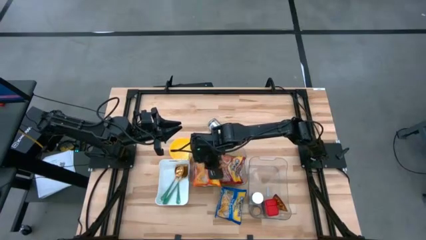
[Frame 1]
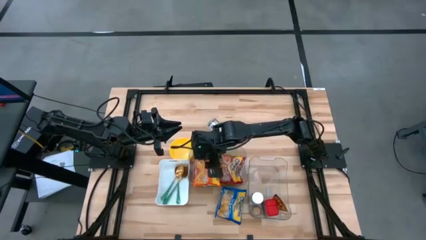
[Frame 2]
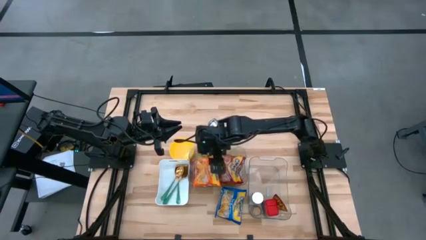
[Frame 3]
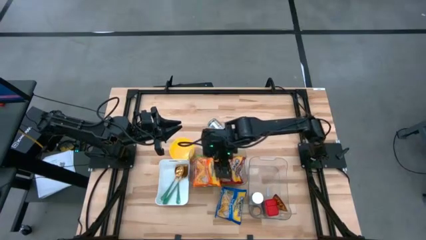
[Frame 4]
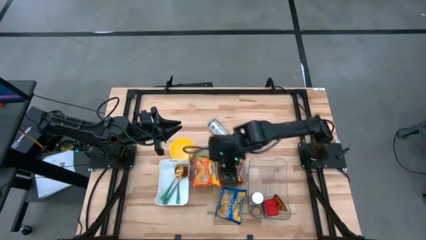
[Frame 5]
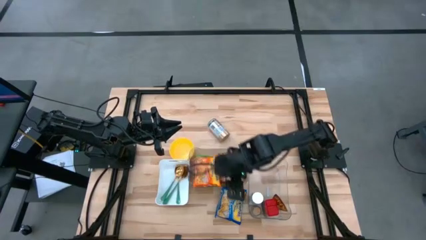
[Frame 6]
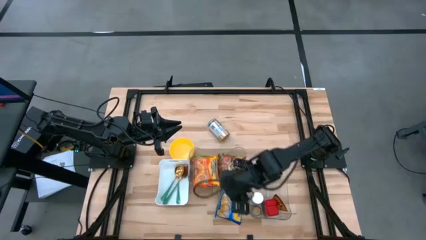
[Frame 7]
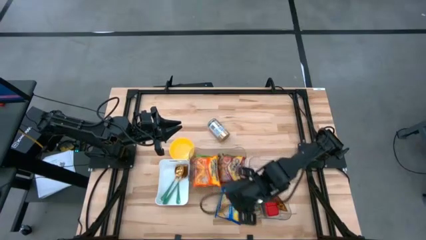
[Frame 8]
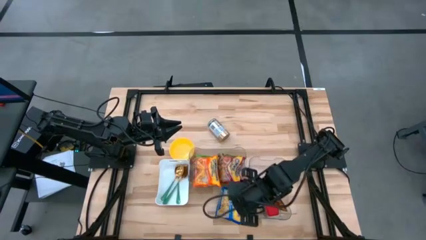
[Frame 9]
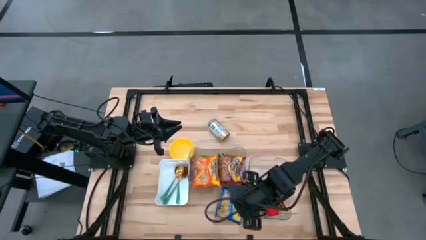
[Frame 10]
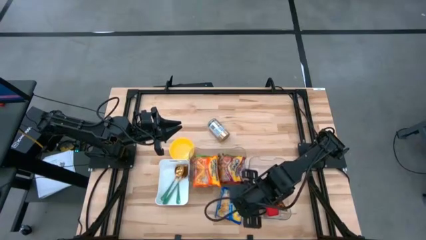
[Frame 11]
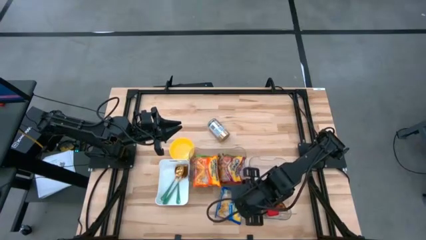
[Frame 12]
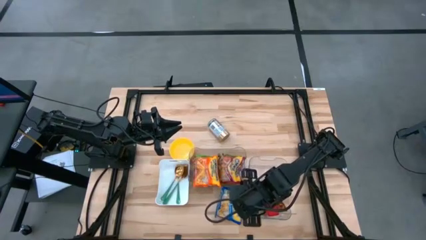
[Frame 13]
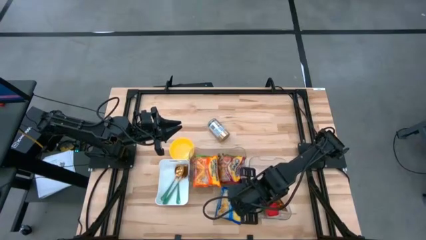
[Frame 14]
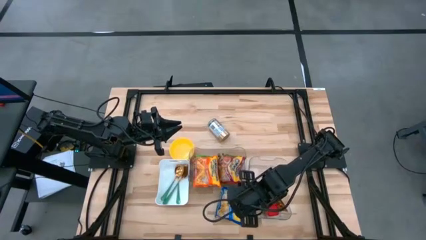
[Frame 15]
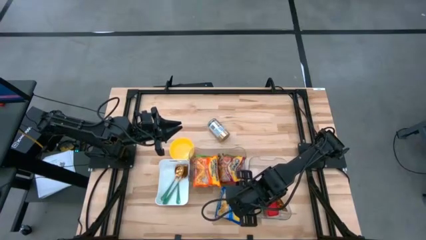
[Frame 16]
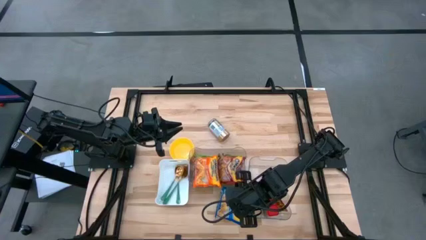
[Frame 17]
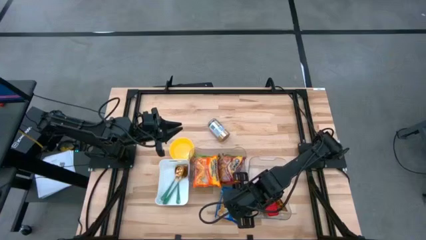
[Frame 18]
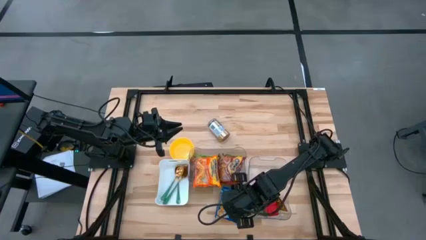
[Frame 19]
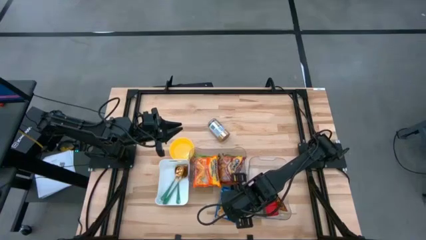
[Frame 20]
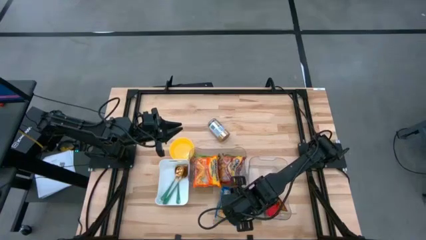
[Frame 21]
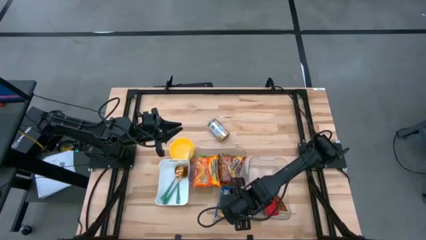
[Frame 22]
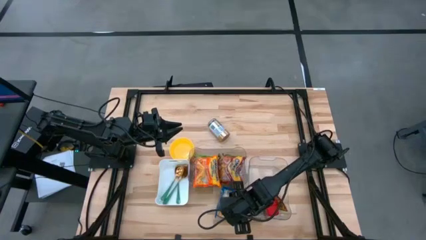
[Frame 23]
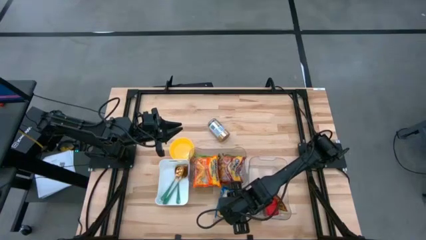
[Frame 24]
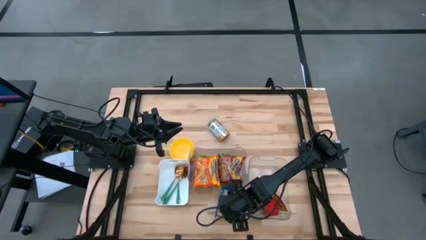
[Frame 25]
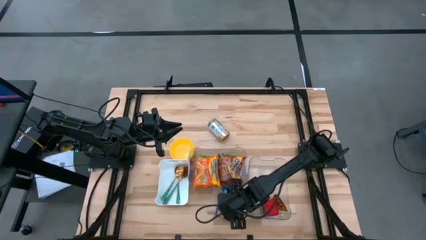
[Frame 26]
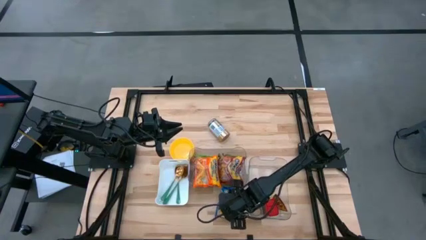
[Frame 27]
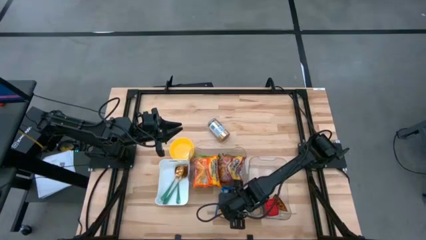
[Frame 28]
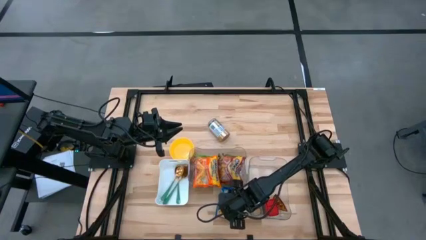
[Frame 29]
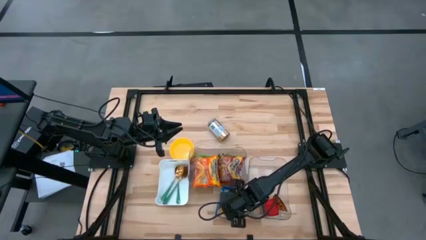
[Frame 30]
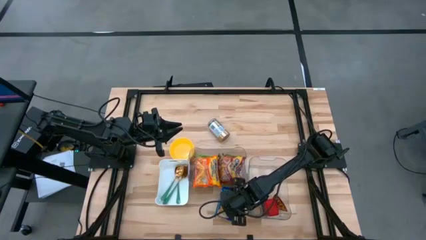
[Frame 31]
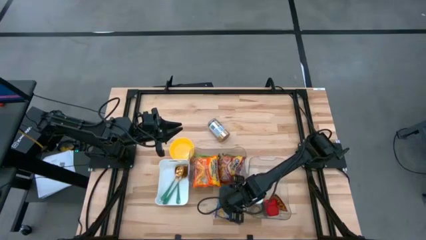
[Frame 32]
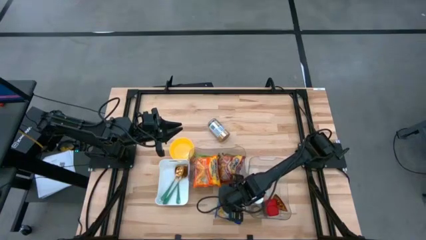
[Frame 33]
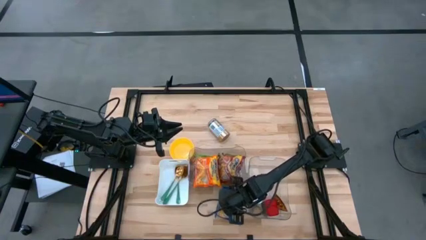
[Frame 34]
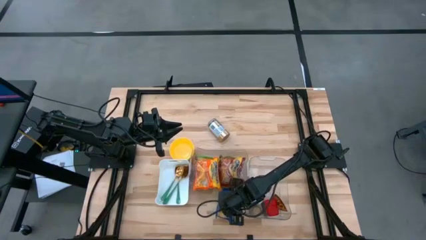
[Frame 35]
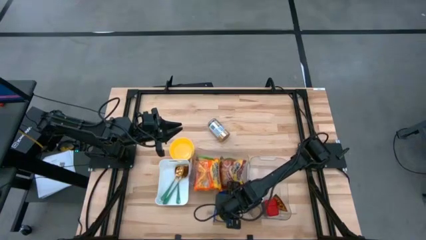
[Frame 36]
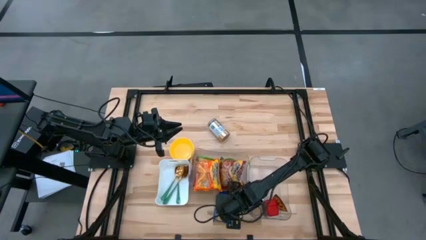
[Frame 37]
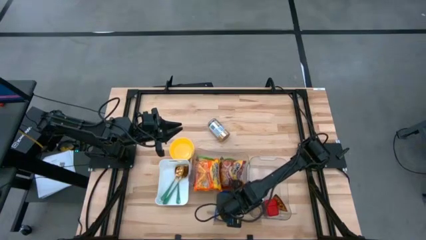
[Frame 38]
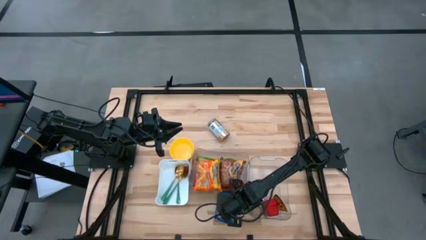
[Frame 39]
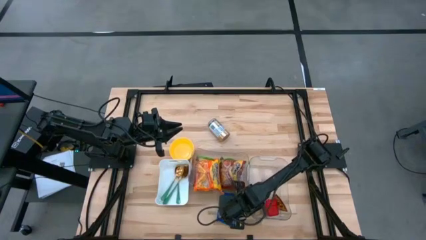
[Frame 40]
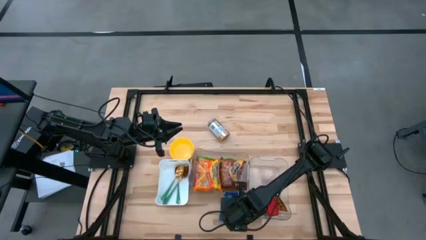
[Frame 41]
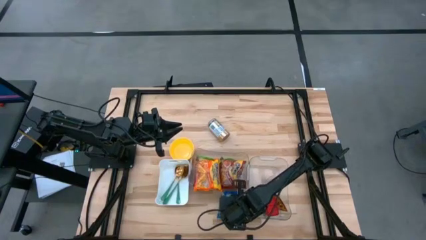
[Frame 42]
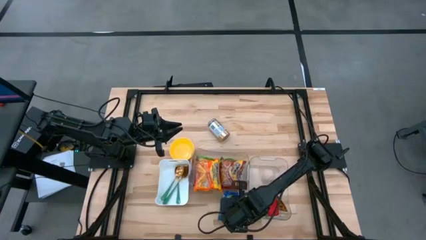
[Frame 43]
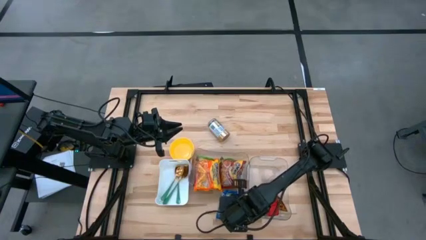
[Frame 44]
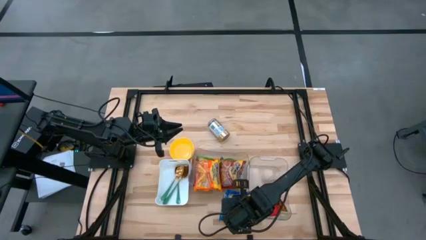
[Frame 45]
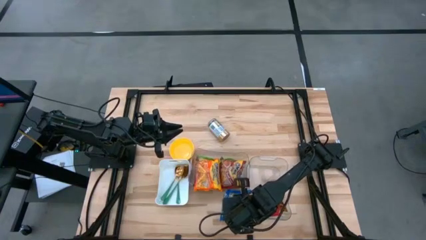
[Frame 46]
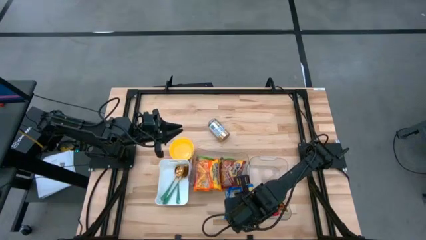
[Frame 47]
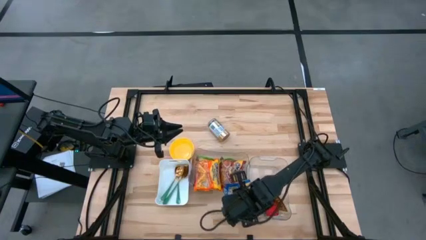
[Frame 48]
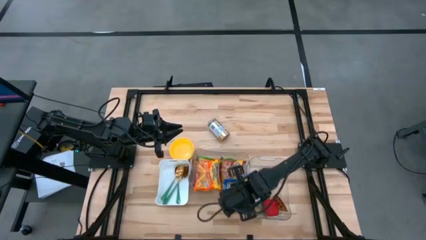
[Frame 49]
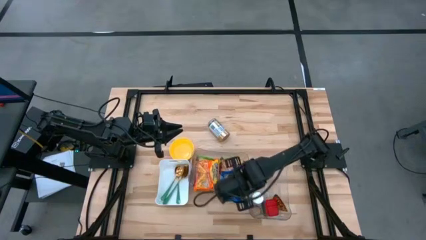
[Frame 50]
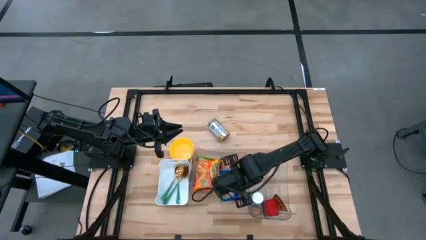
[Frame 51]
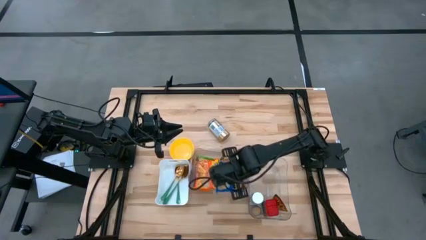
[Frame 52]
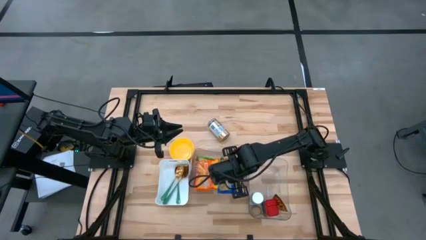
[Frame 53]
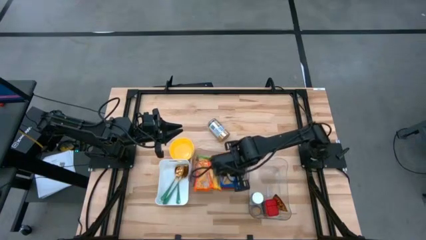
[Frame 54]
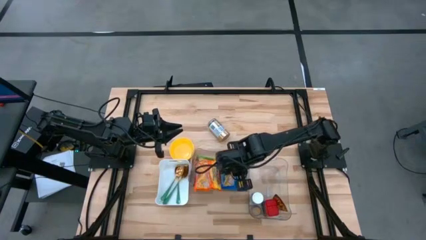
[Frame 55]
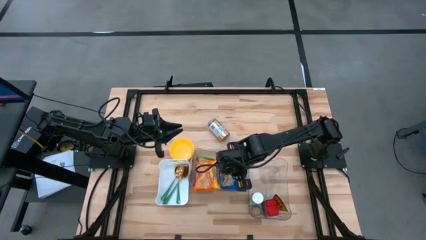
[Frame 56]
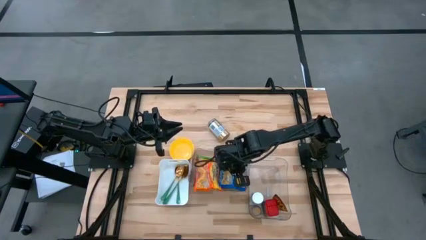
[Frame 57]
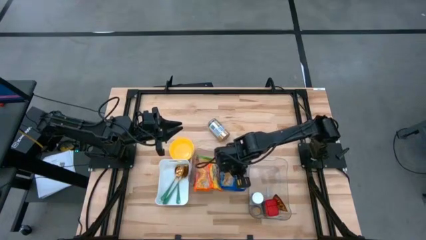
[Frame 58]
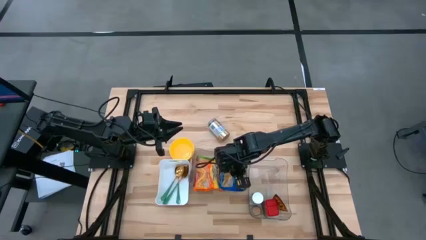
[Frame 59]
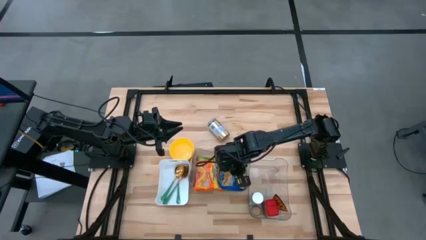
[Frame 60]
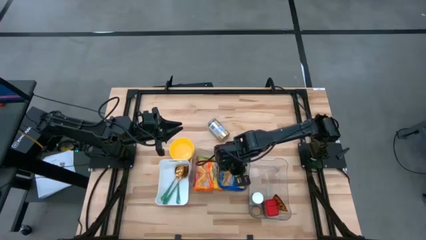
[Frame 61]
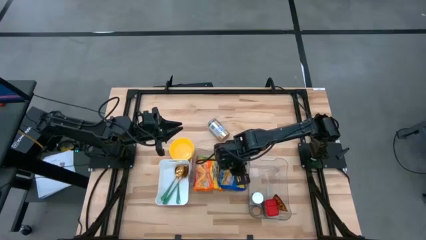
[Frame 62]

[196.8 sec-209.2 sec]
Task: Pick & Place Food Item
Put the blue noodle pack into the left transparent bin

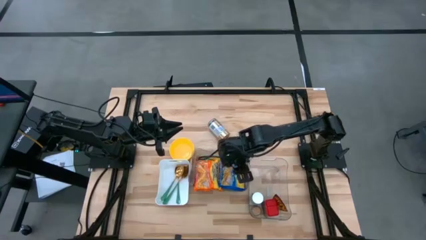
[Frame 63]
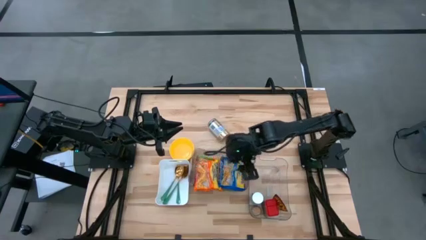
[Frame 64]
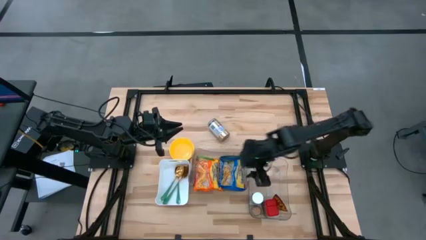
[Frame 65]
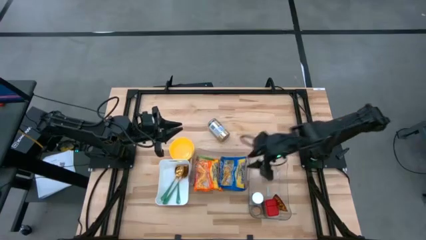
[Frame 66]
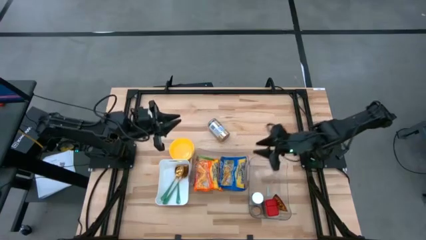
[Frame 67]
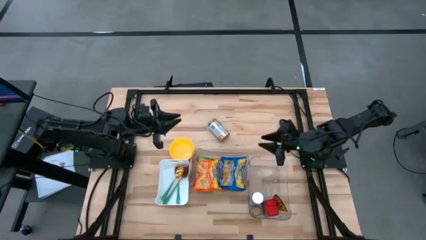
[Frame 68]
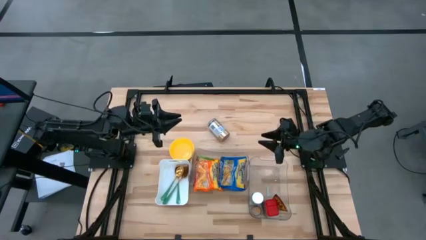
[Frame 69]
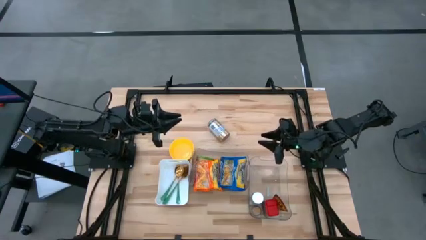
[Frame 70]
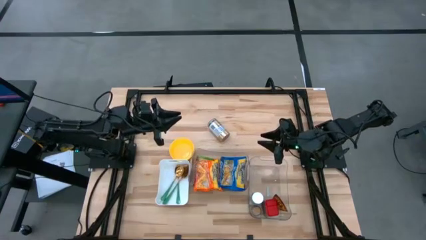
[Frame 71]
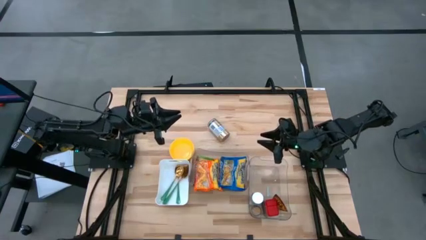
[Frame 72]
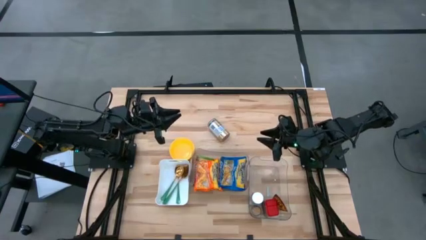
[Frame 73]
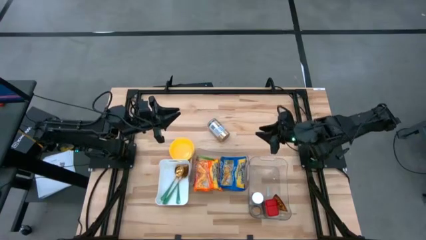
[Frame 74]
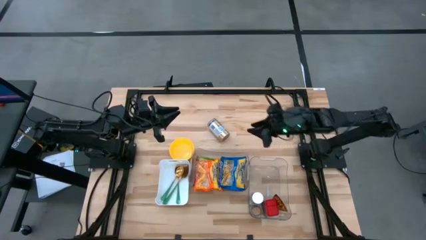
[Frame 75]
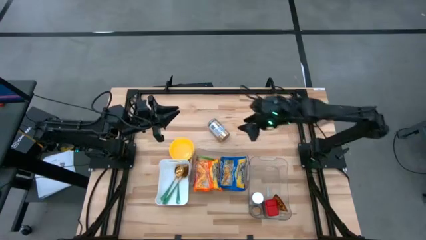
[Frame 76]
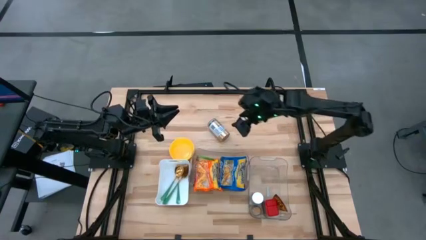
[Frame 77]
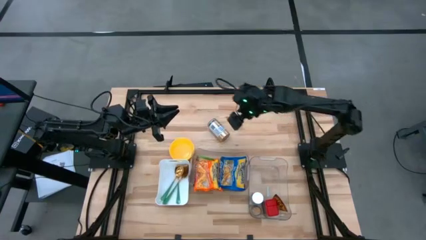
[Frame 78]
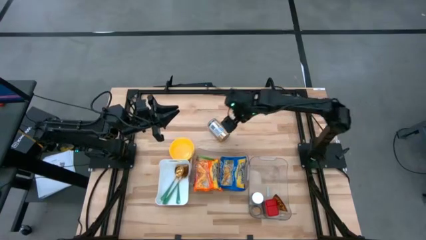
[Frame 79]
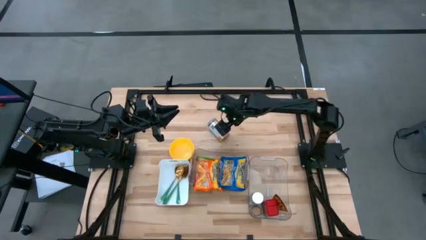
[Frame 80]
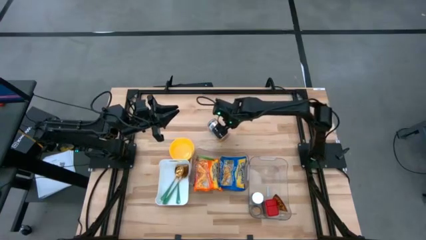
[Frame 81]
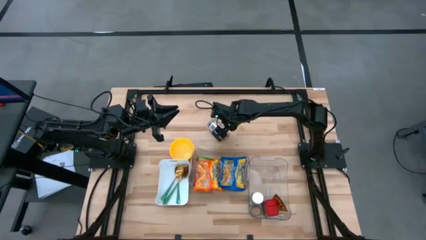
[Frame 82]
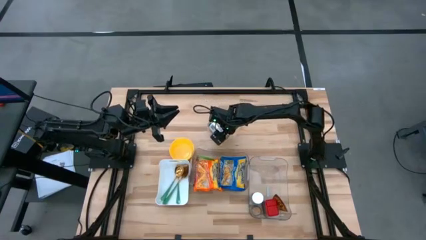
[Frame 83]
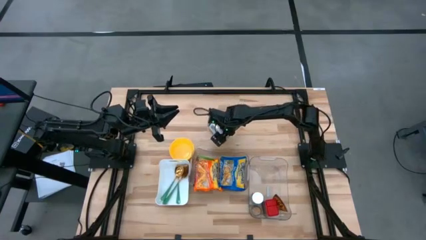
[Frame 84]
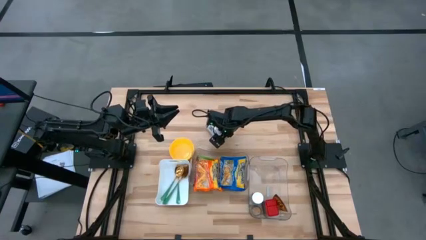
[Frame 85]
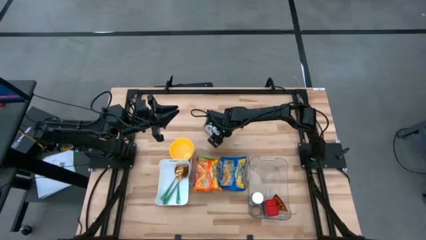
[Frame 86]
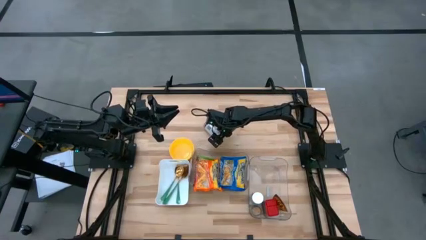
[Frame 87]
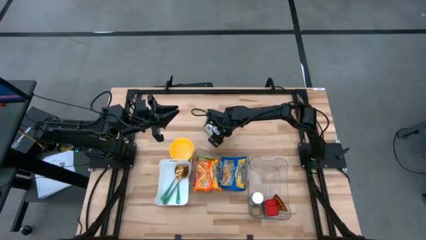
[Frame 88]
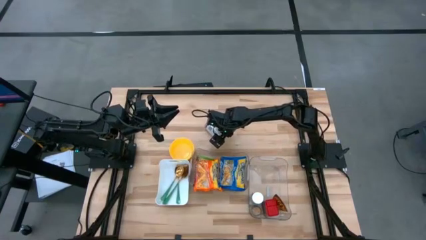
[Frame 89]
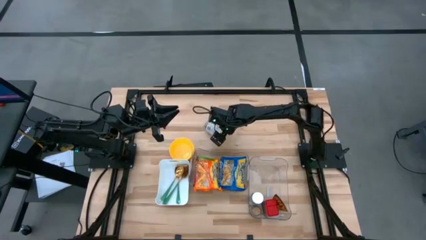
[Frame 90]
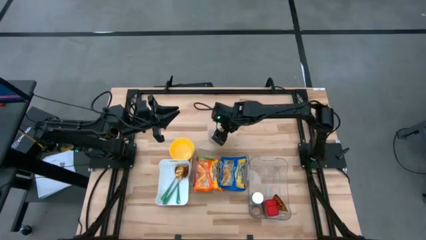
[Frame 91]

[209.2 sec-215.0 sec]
Put the golden seasoning bottle into the right transparent bin
